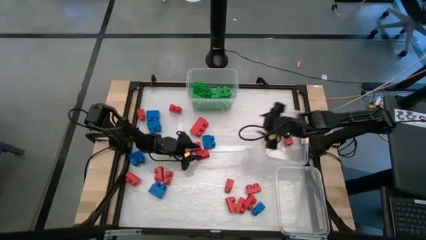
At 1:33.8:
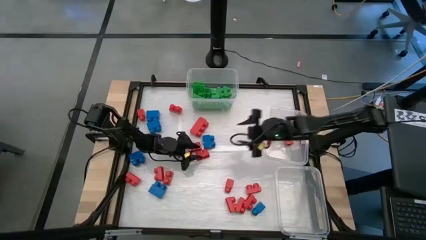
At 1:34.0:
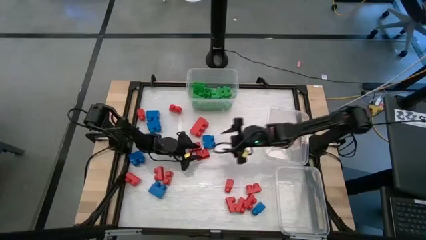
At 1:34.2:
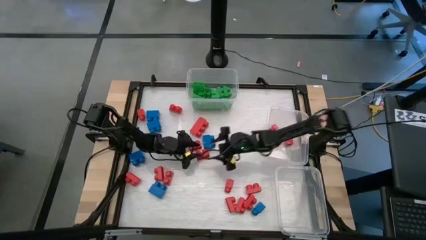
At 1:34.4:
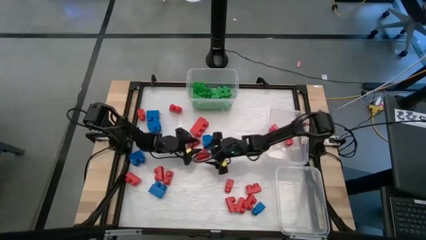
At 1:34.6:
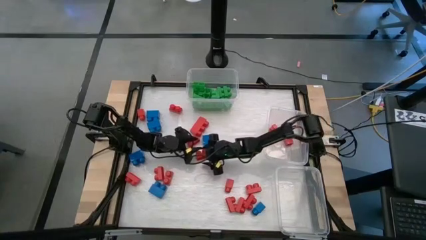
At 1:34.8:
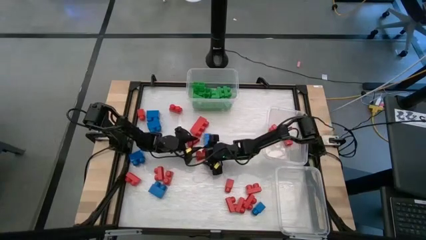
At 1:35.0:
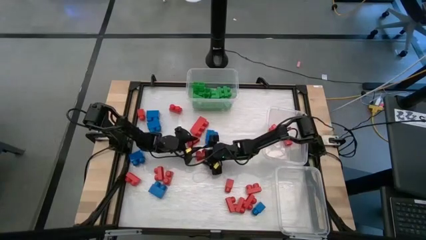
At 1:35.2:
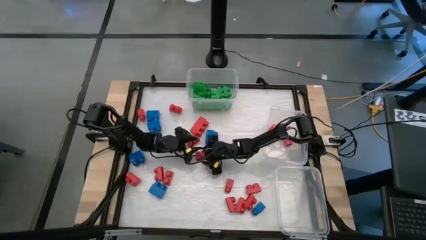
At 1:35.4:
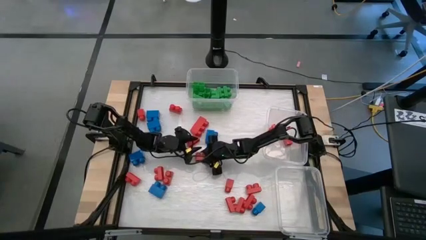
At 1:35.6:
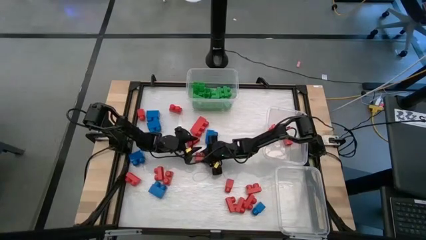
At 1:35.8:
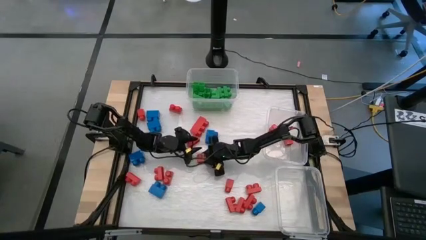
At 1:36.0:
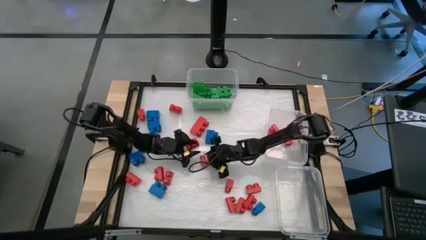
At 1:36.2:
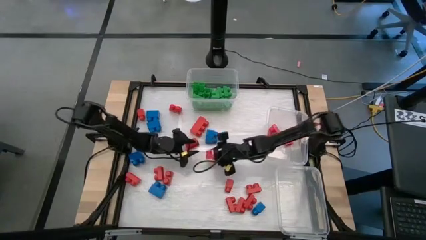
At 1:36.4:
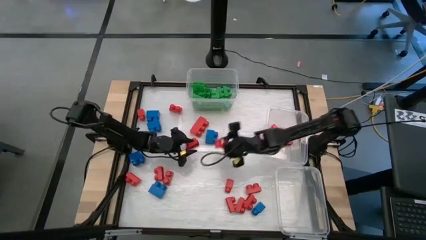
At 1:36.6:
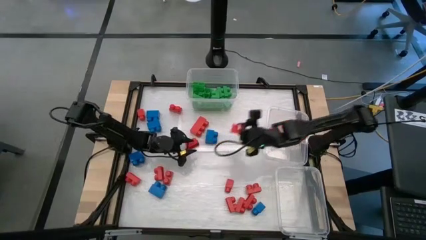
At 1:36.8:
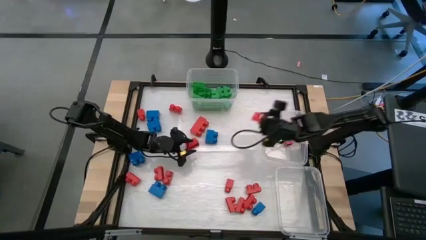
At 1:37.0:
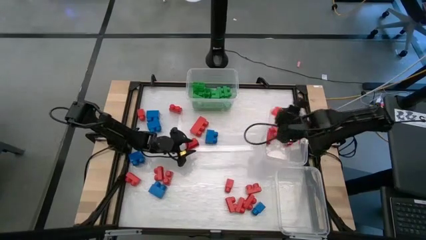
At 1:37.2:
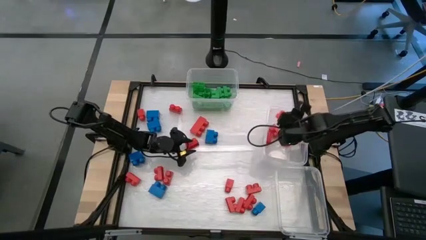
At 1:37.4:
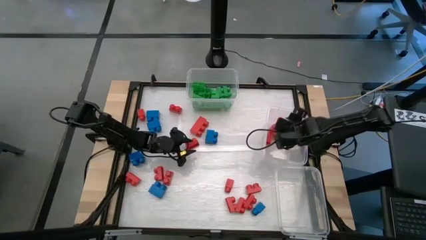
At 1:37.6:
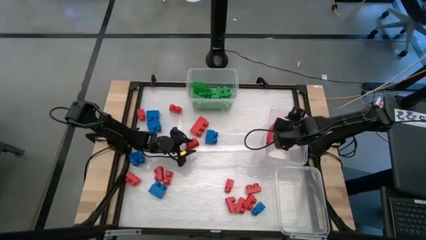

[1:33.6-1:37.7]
Task: Sort blocks
Put the red game piece into the middle right transparent bin

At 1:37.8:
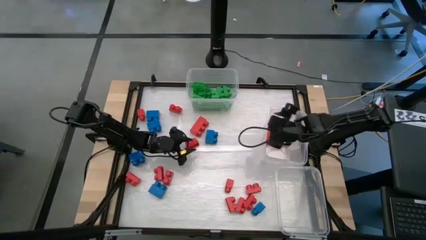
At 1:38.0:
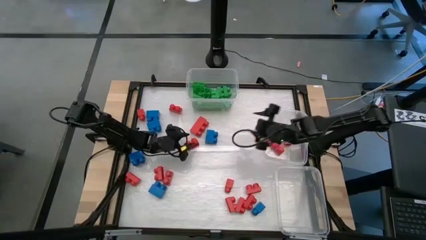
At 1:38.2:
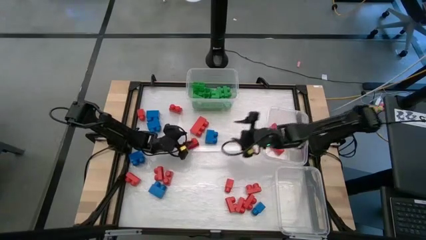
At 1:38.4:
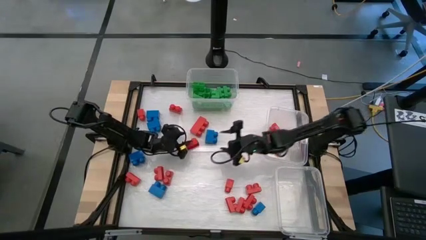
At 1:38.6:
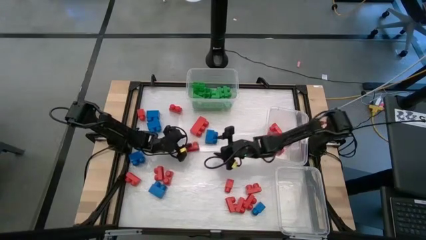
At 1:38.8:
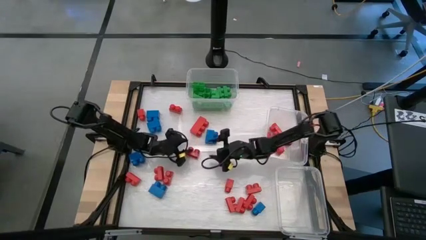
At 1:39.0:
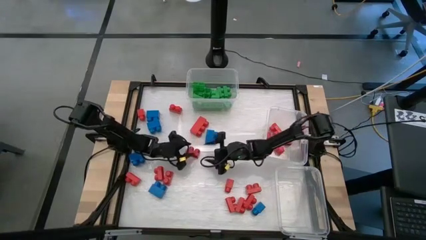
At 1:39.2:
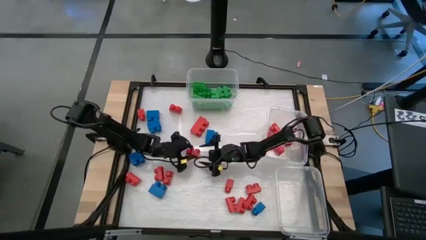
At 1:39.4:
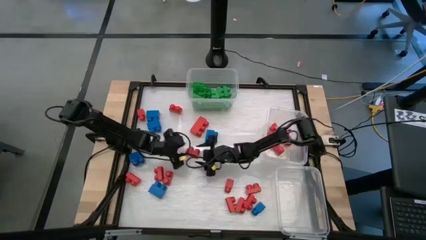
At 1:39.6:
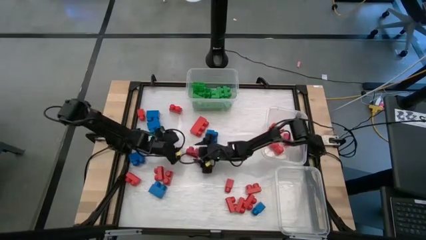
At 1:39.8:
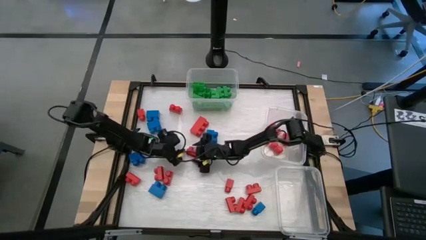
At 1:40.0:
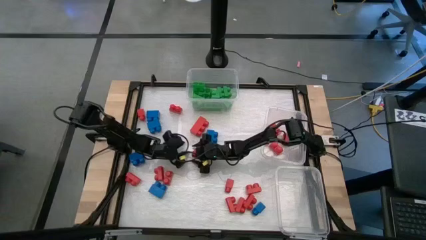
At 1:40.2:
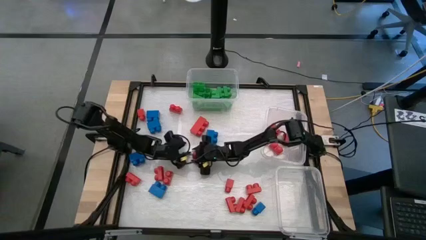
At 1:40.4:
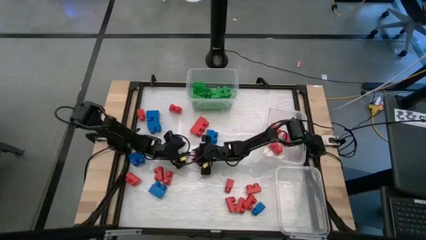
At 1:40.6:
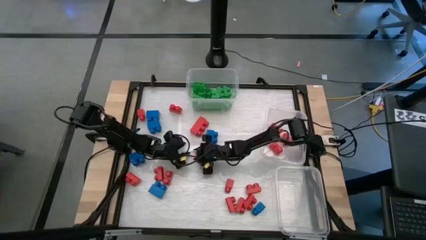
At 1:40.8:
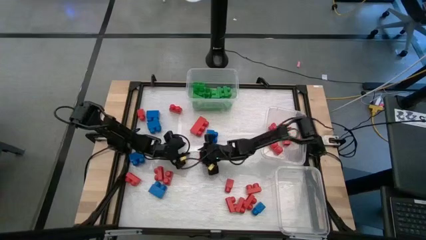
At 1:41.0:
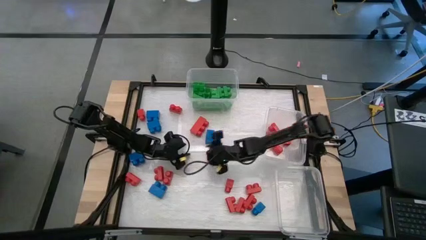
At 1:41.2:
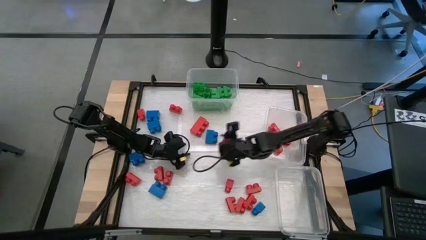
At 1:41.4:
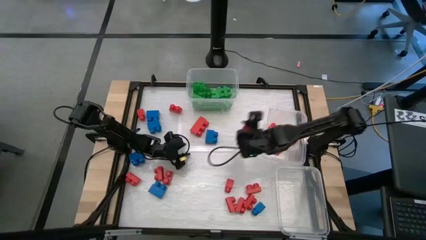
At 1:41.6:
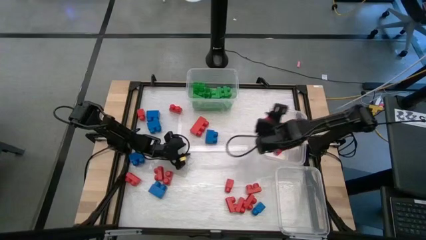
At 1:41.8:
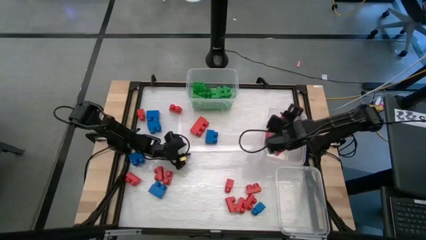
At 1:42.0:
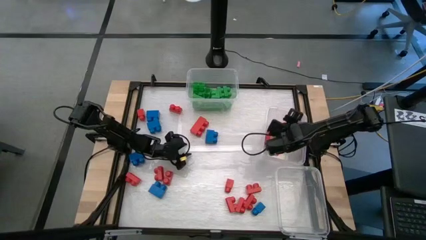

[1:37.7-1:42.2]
Put the red game piece into the middle right transparent bin

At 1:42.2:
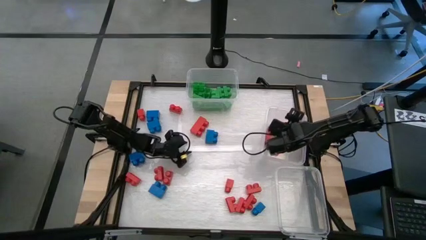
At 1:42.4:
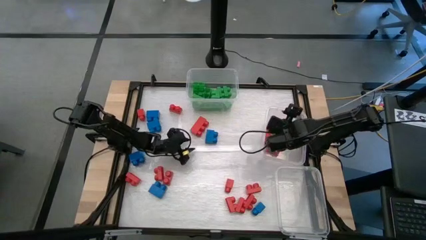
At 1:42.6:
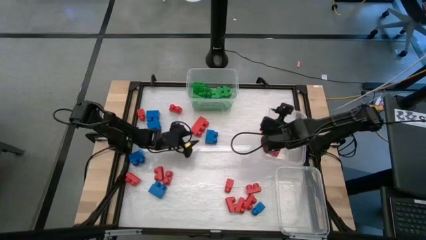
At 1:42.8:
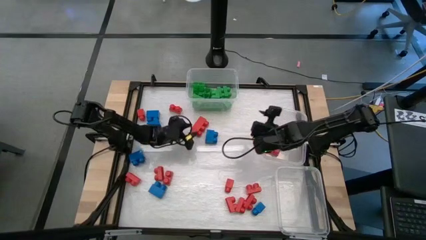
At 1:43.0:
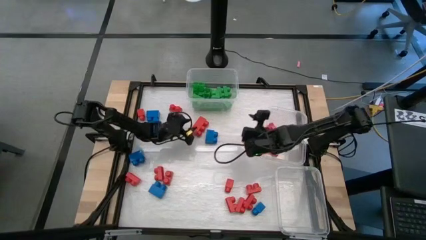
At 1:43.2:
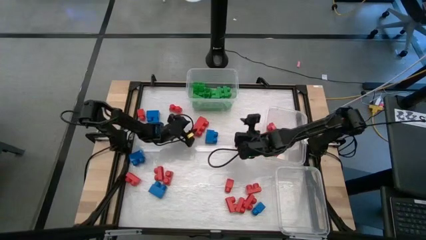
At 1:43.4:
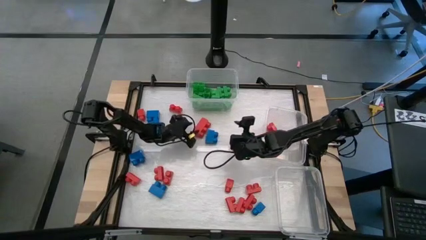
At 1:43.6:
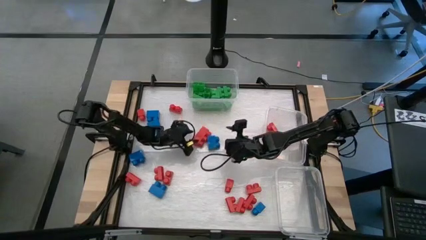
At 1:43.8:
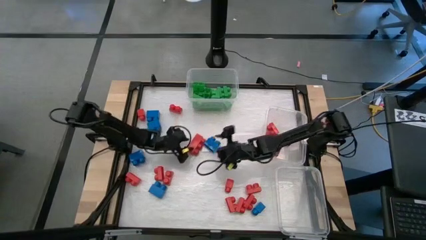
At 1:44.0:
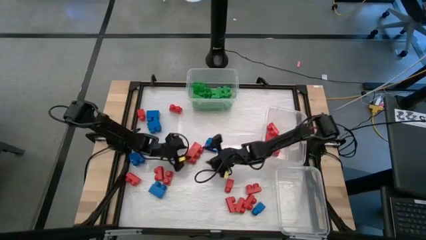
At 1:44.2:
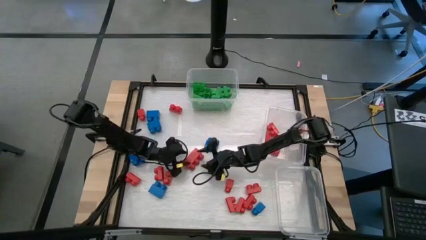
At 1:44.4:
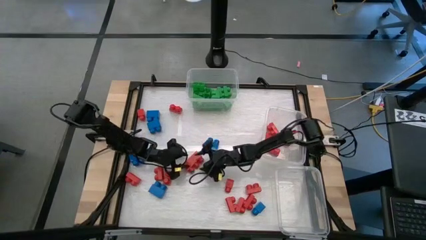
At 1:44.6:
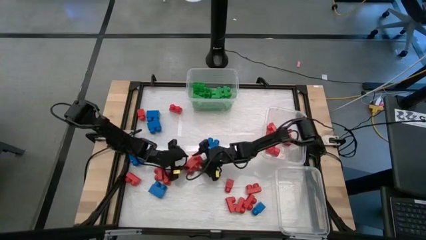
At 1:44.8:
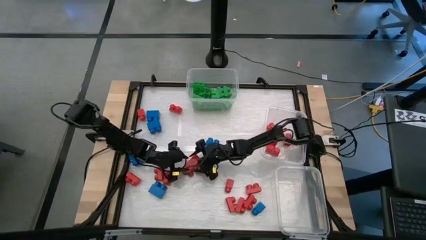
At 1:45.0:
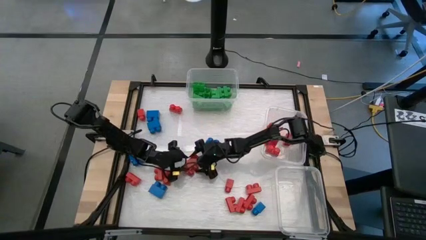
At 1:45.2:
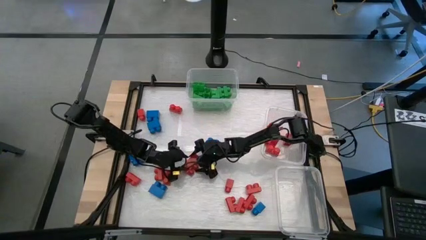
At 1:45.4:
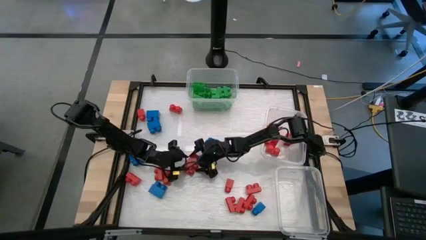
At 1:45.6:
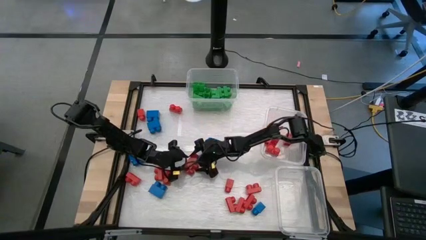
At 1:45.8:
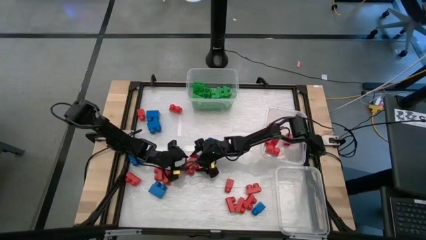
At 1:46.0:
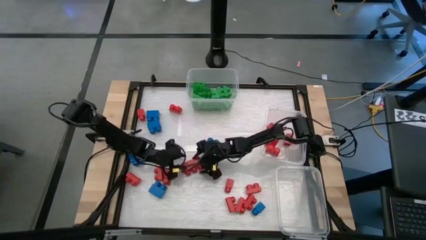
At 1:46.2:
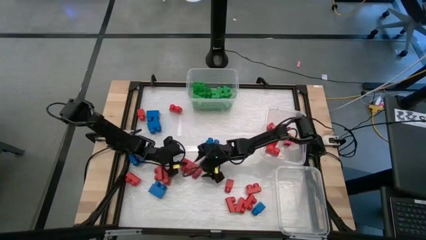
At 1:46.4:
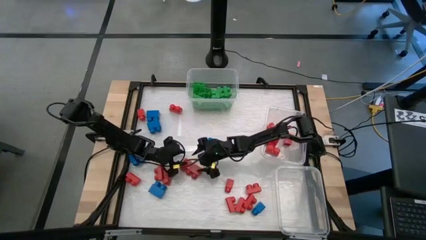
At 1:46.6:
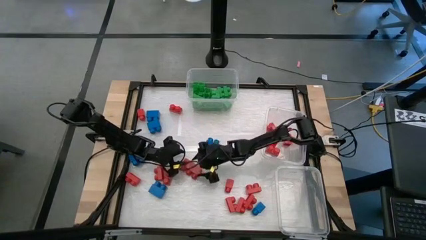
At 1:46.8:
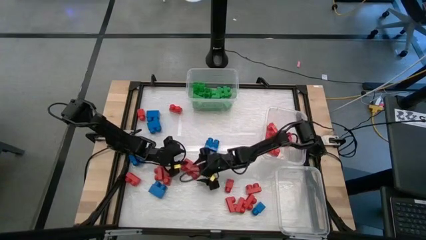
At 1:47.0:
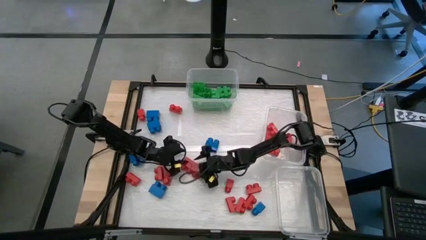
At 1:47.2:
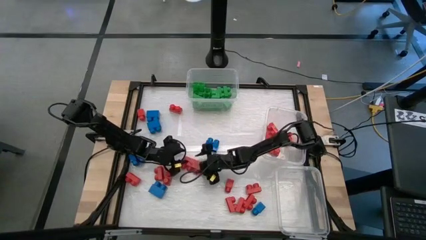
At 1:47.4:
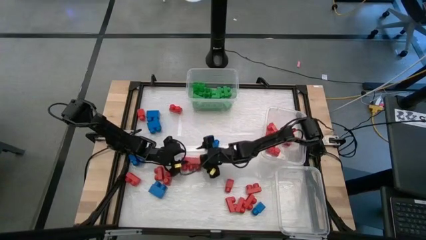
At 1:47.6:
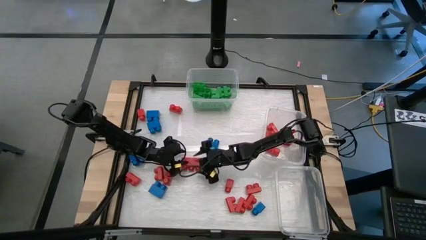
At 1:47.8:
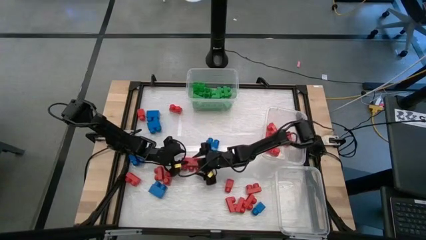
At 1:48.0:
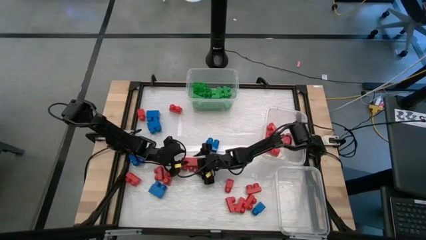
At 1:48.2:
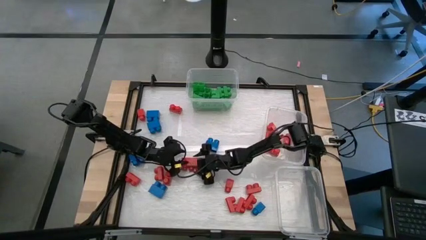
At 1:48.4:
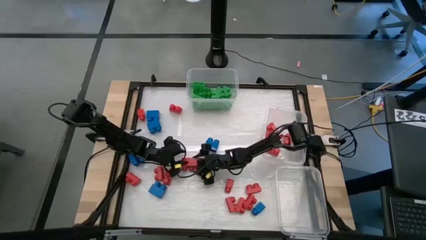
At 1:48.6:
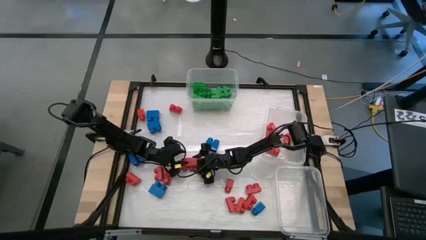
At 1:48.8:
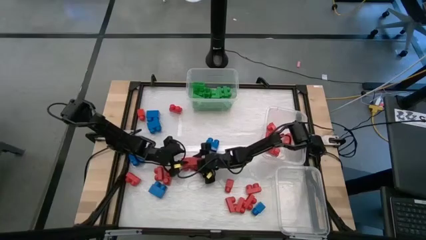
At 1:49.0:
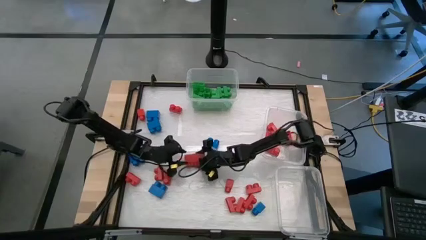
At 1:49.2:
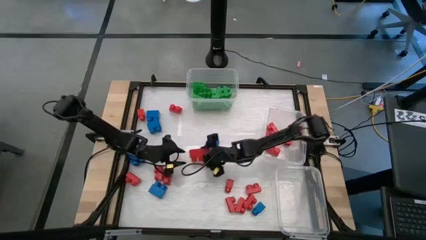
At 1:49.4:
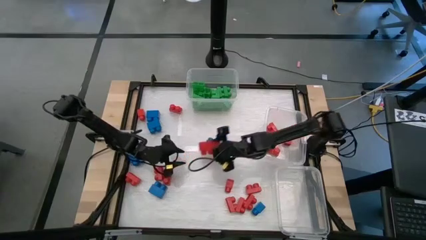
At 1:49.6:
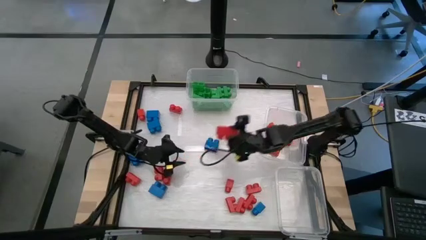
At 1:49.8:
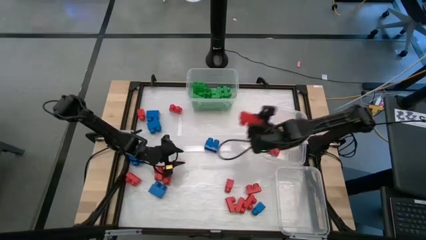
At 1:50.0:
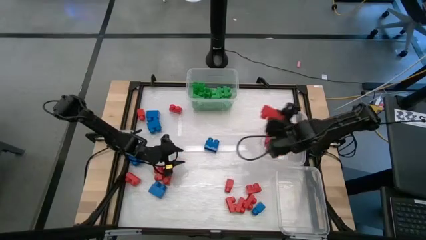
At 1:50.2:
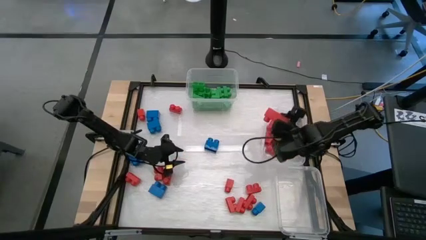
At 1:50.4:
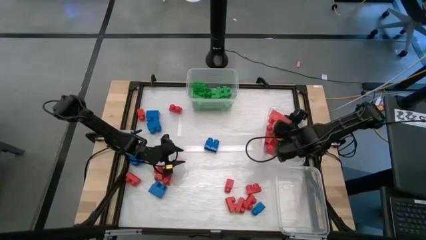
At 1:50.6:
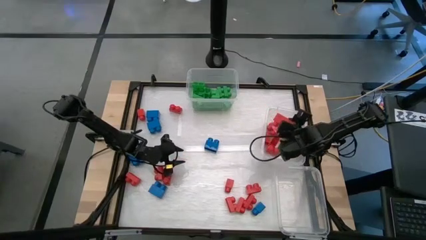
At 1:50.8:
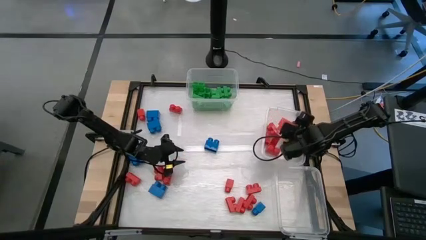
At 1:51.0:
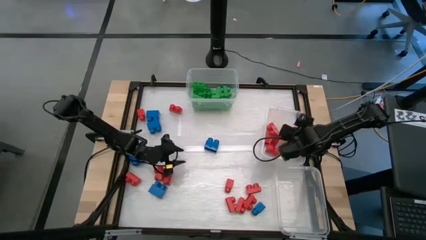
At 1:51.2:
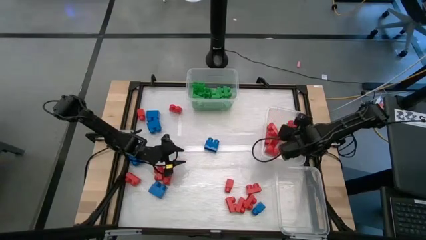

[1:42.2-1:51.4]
Put the red game piece into the middle right transparent bin
